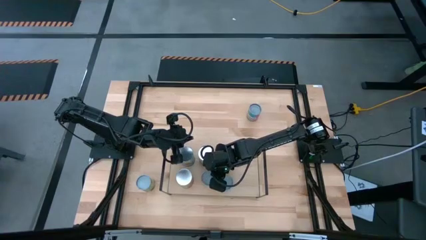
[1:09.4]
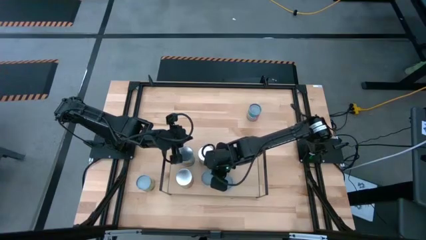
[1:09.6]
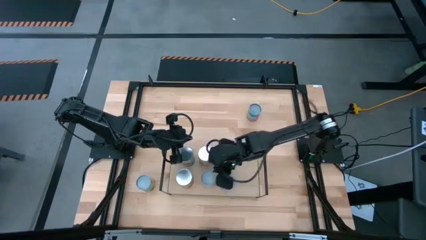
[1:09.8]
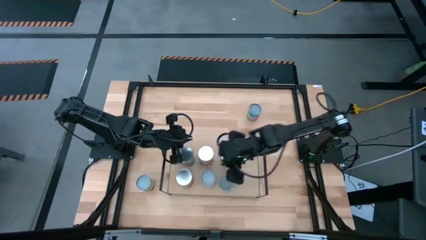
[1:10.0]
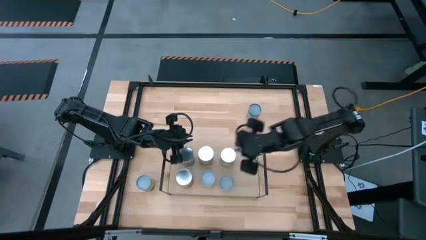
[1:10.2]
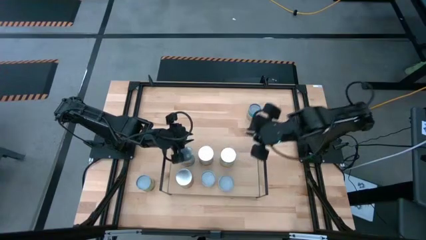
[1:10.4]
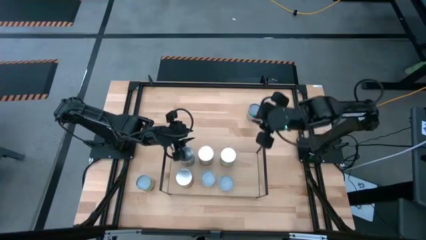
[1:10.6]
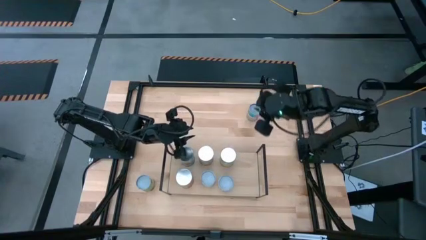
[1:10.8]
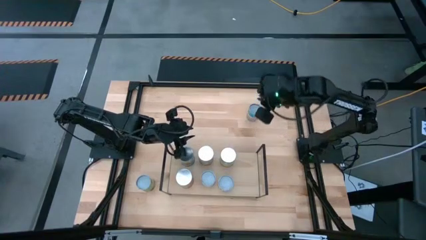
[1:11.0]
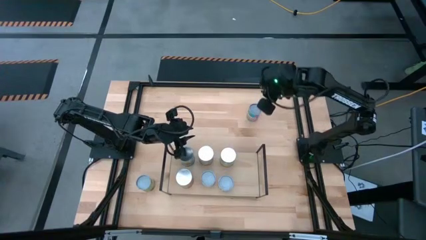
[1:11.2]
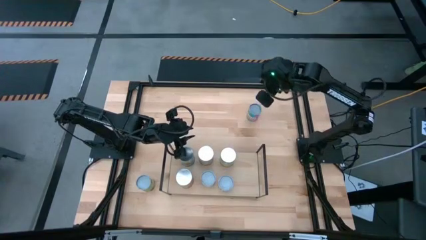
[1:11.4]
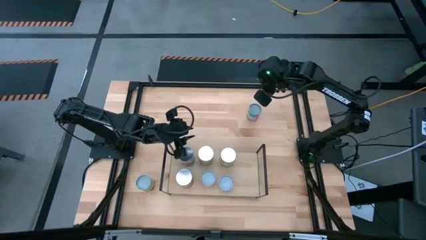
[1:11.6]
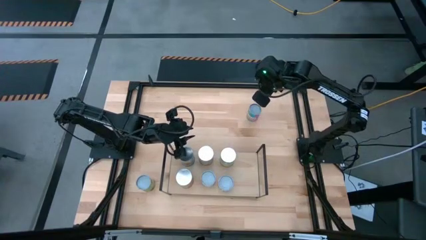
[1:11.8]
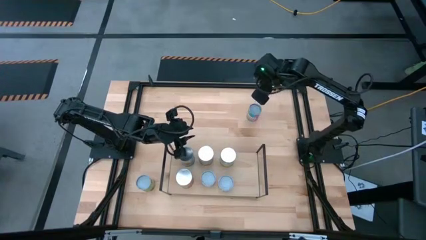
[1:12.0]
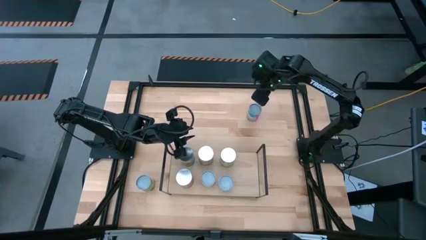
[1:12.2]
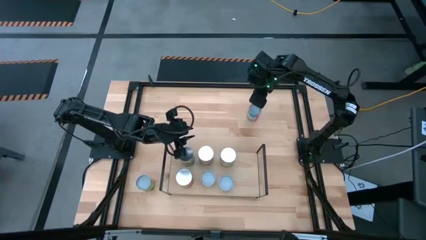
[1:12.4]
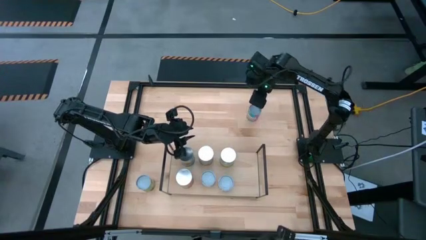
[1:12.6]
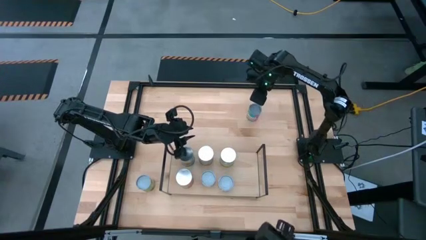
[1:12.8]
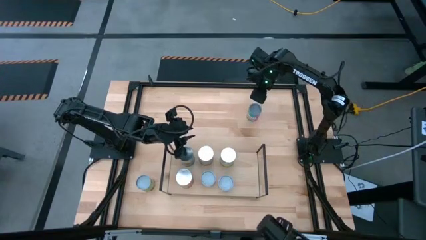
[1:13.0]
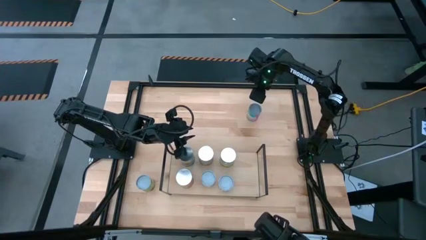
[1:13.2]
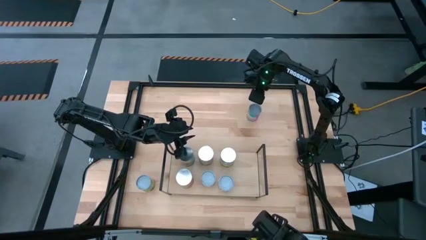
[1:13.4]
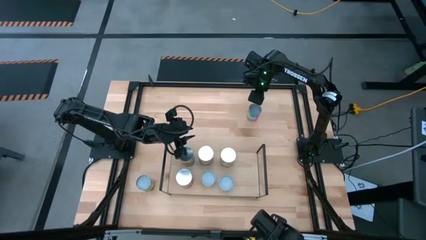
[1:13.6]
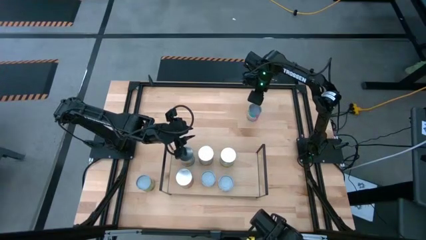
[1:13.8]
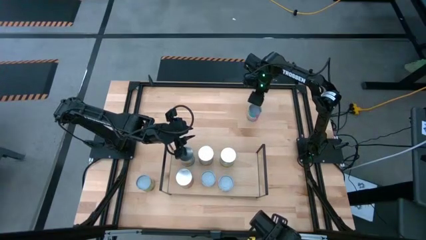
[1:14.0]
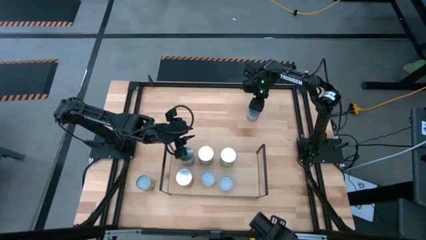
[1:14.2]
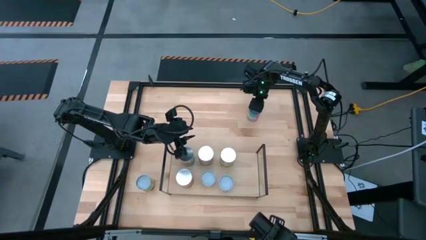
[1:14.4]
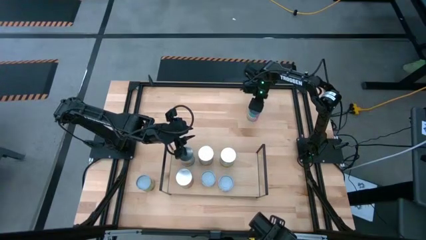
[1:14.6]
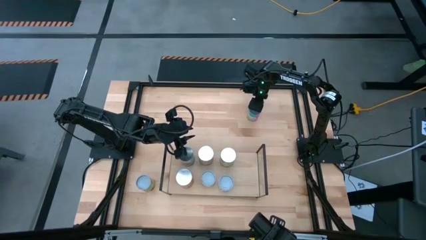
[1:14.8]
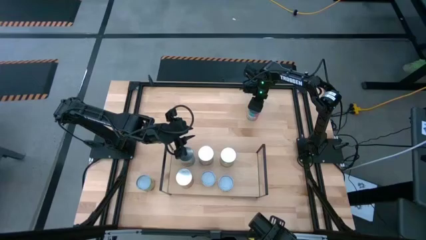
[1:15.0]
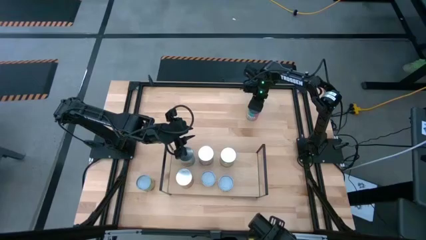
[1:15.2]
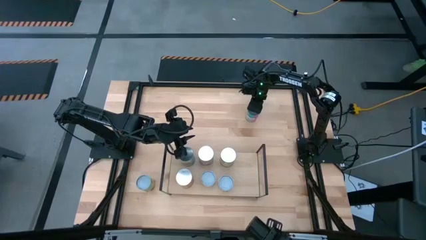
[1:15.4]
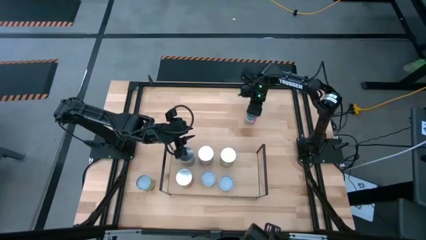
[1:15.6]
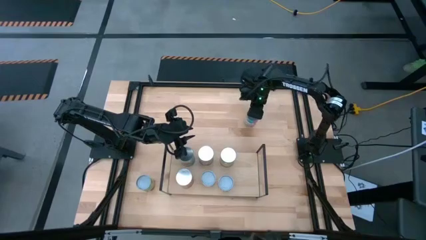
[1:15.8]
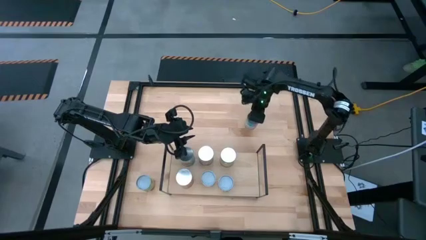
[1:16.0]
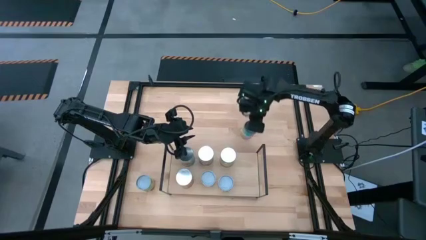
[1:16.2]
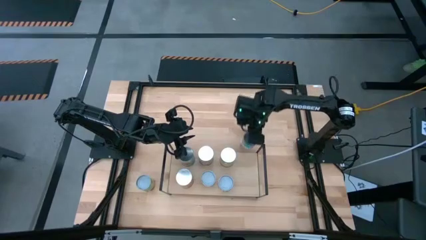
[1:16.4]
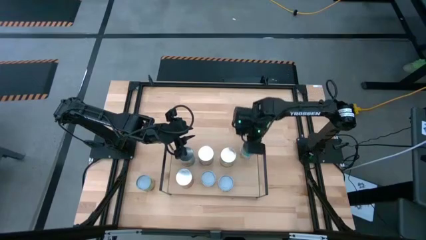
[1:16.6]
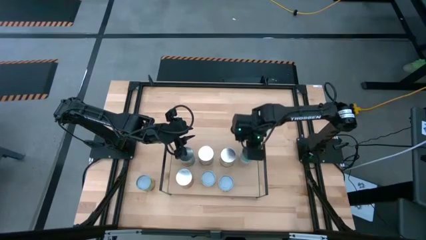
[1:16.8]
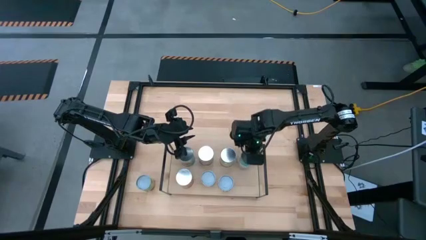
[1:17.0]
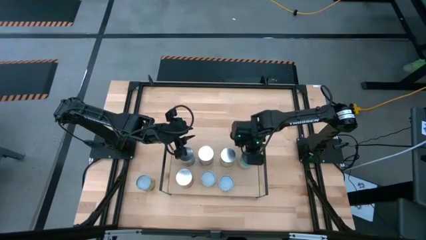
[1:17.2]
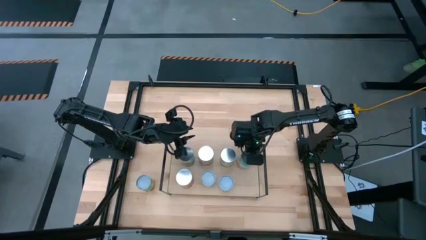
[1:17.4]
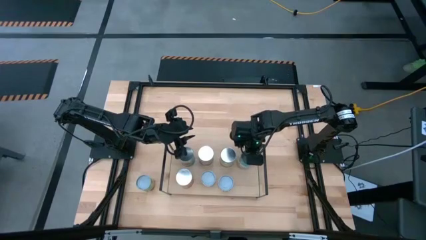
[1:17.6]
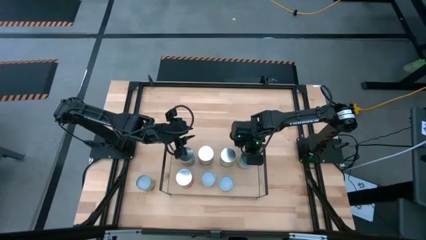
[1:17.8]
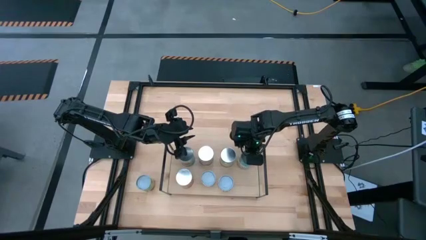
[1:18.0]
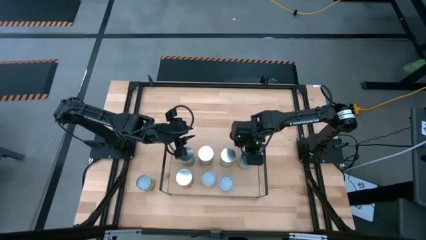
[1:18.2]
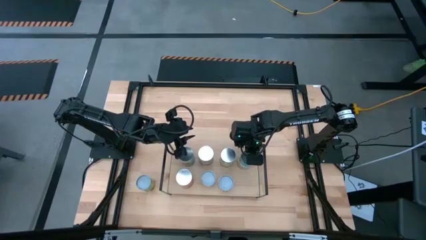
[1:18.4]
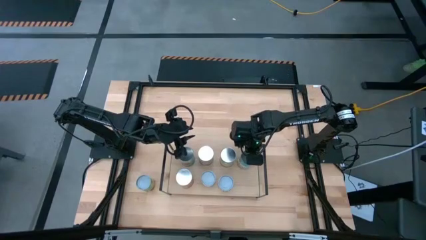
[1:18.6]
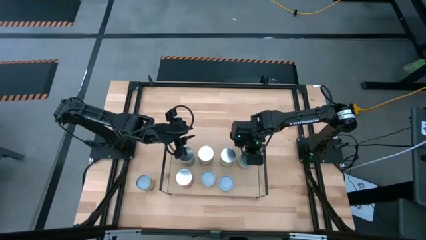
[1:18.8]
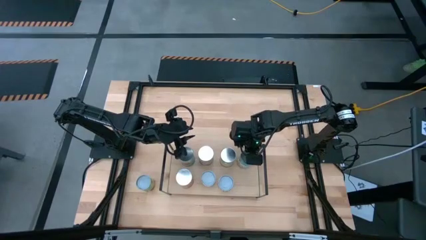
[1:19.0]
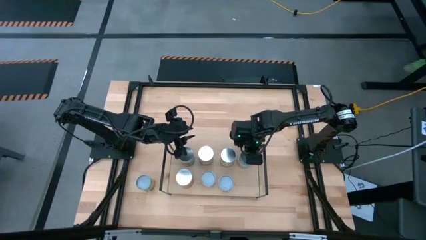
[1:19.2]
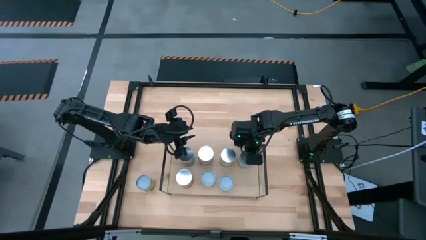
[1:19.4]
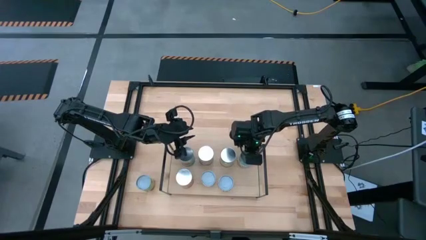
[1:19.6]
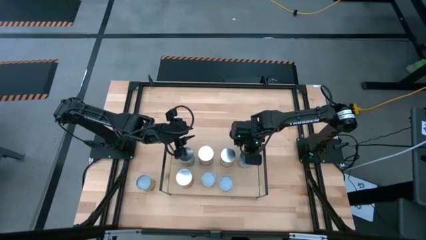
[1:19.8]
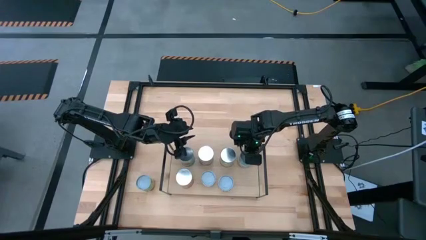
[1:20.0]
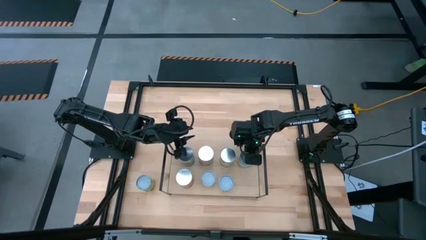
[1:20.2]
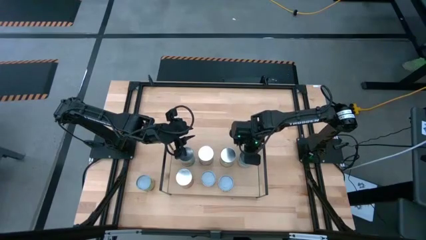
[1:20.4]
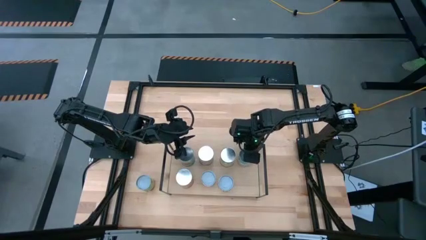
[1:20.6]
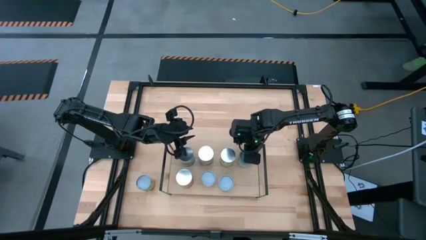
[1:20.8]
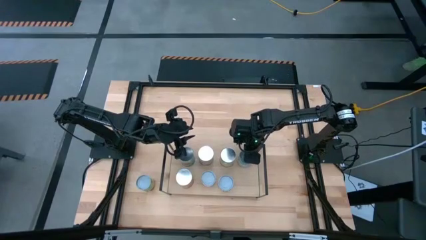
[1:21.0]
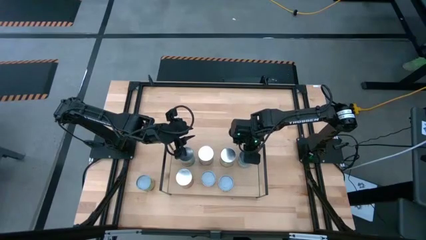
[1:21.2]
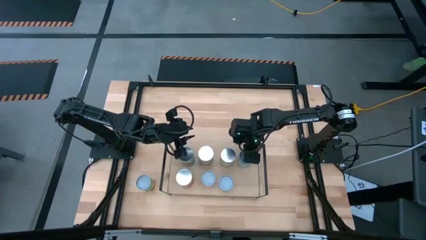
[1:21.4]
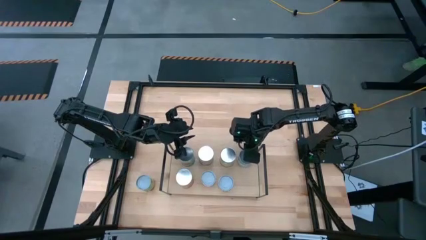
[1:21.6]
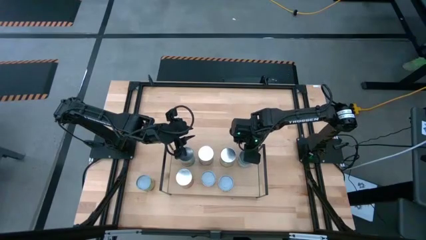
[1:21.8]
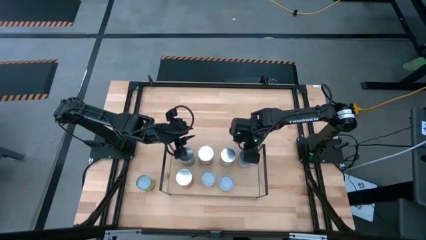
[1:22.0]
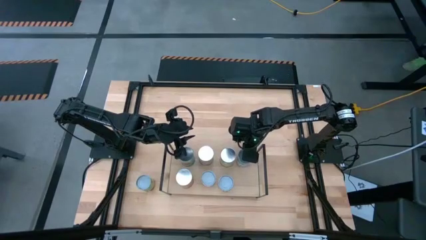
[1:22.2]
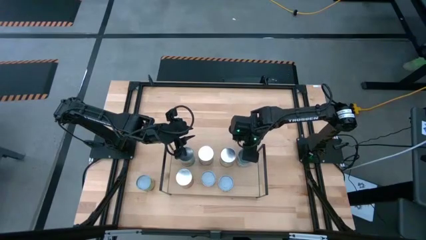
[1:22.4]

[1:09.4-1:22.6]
Task: Pick and place cans onto a shelf
Put the blue canned chicken soup on the shelf

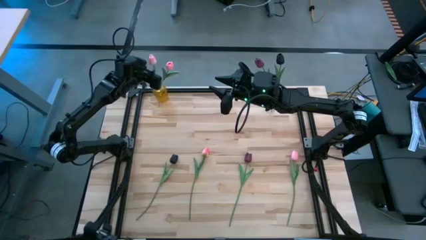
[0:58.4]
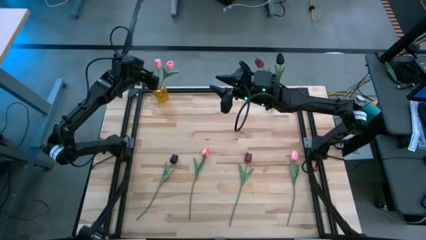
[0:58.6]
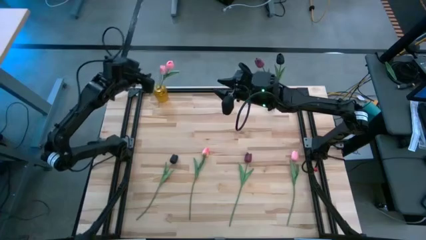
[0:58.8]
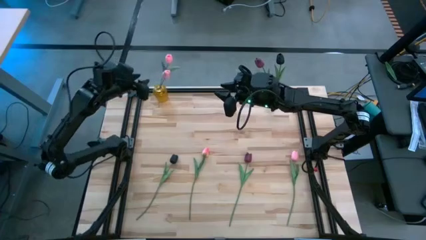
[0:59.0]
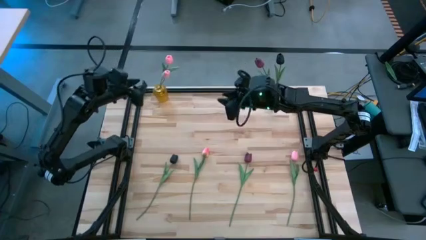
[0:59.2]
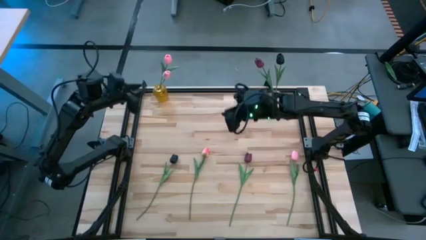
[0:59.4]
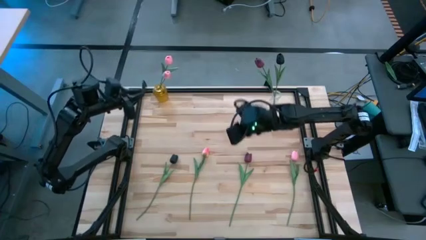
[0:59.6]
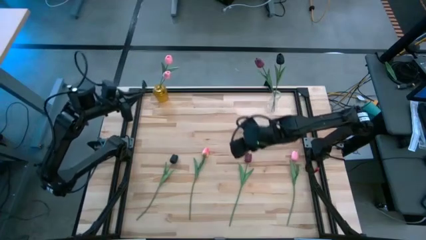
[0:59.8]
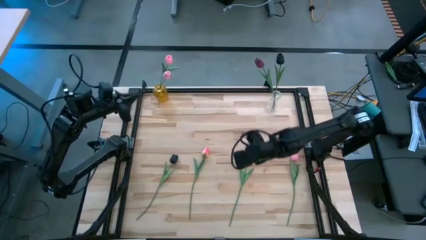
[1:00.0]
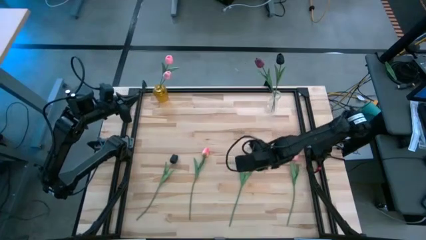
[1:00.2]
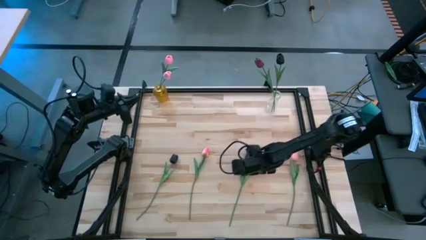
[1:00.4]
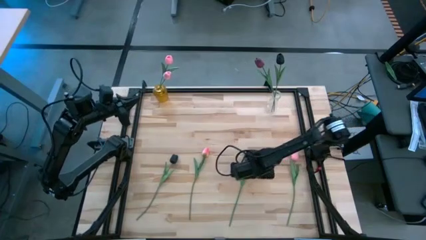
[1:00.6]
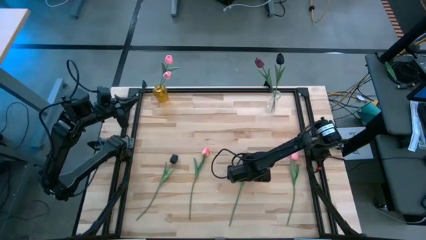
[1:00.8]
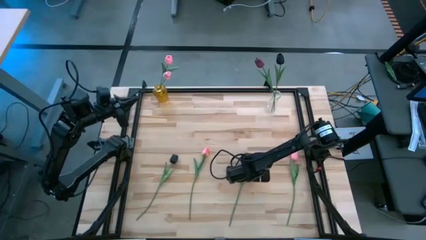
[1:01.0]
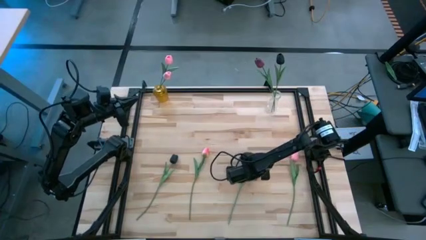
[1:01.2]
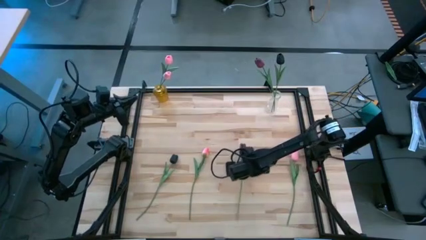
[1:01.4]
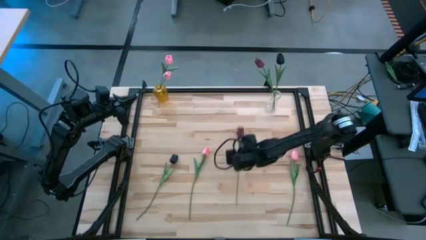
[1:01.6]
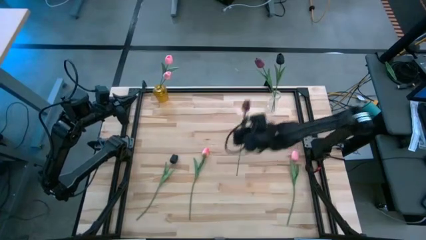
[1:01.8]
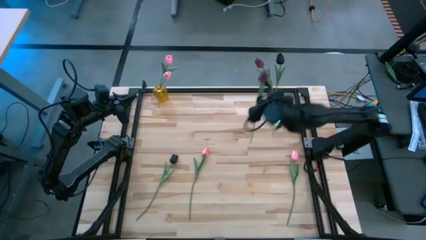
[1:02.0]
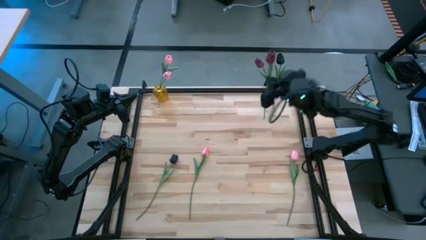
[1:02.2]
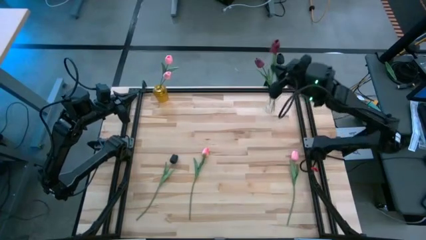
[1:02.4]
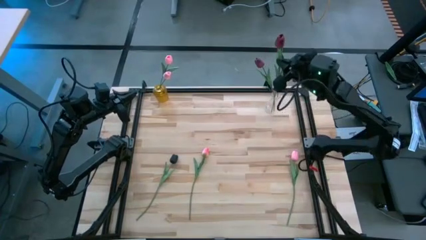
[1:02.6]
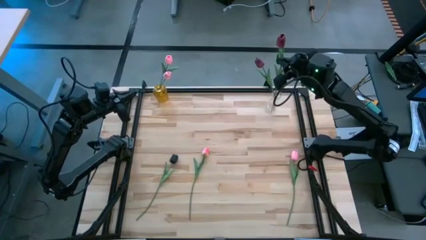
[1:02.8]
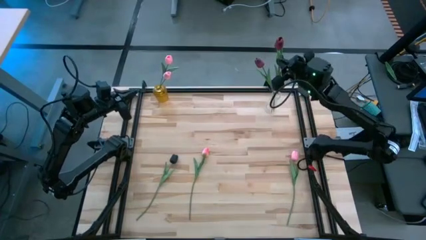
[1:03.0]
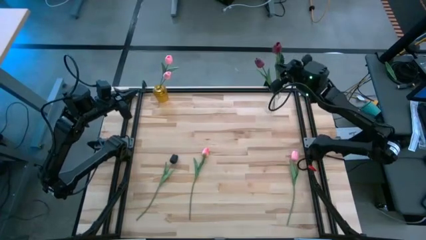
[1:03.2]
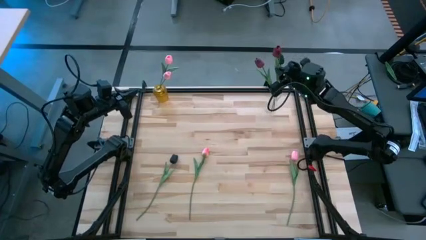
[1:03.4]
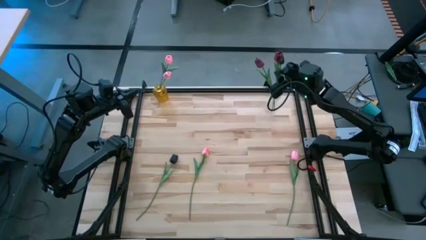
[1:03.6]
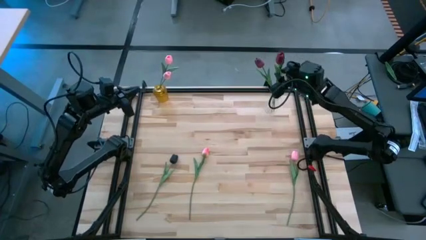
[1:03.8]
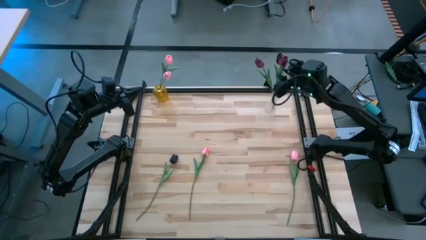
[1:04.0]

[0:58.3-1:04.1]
Task: Sort flowers into vase by color
Insert the dark red tulip into the transparent vase
